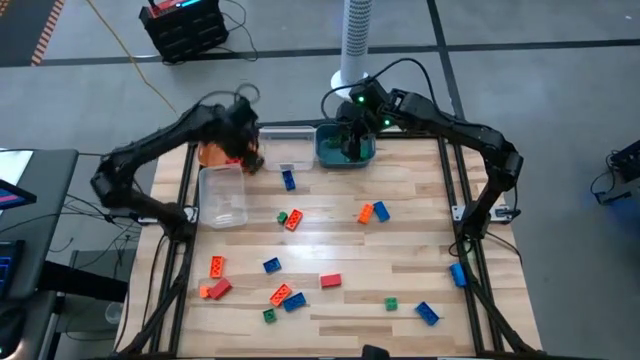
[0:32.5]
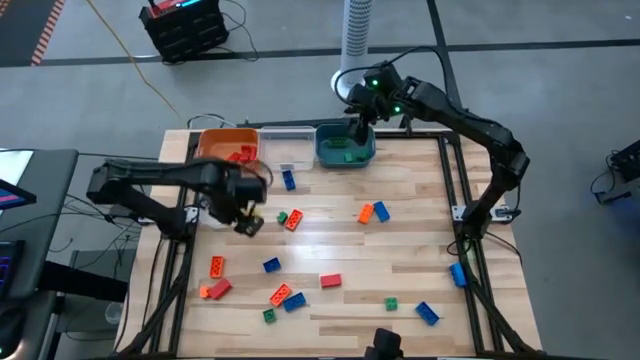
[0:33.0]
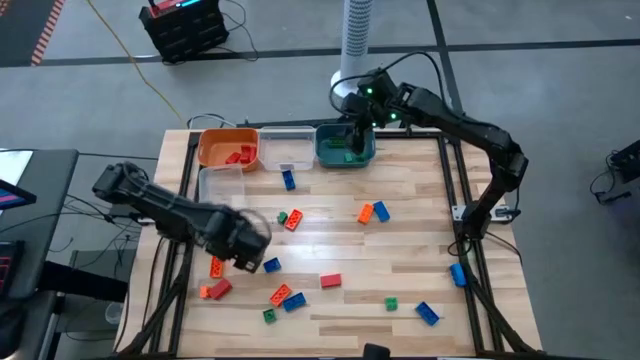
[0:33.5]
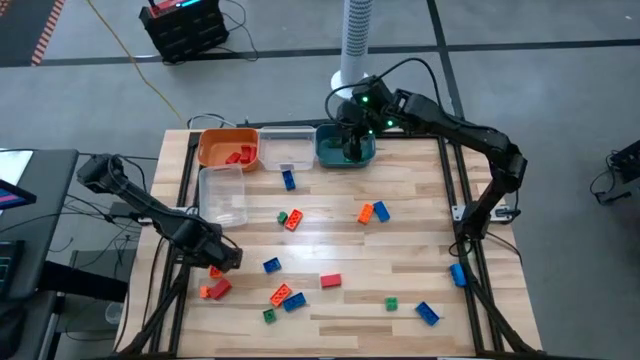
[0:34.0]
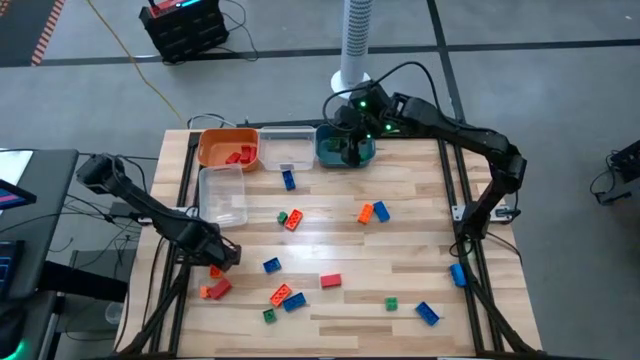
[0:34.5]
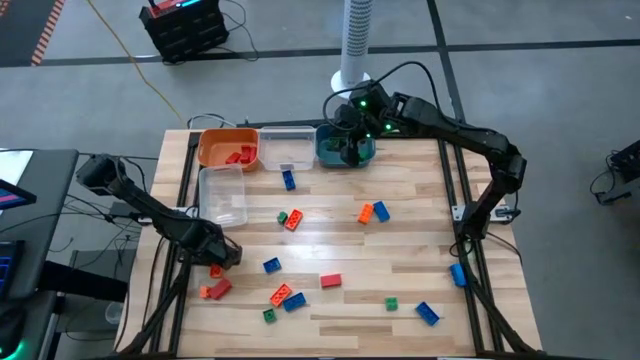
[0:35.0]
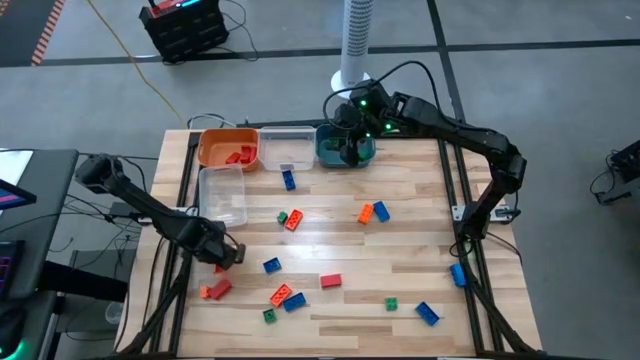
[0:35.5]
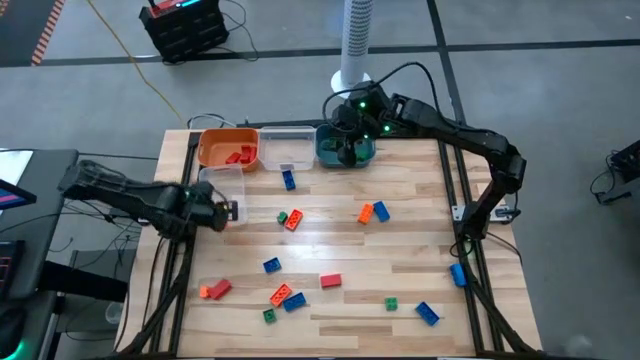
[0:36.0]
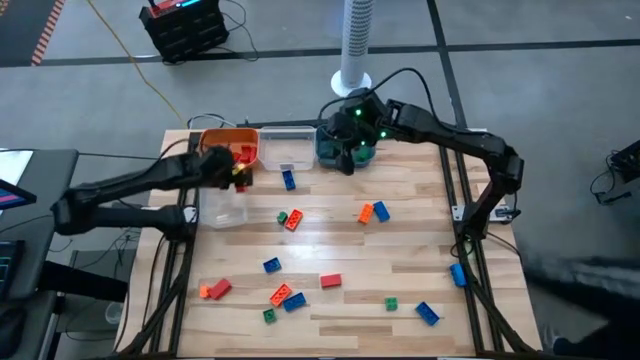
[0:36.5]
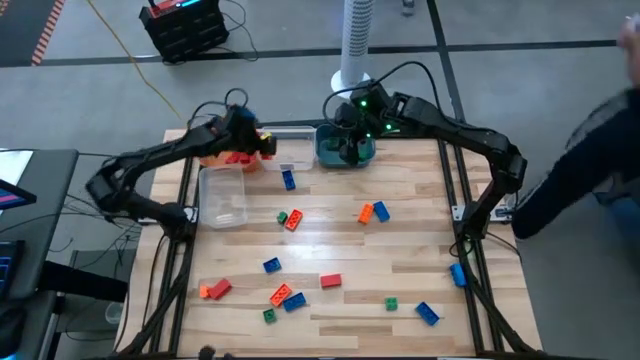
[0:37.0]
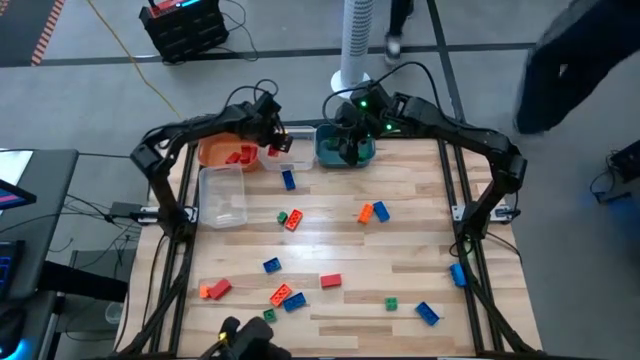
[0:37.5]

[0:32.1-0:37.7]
Task: Sort blocks
Put the orange game piece into the top transparent bin

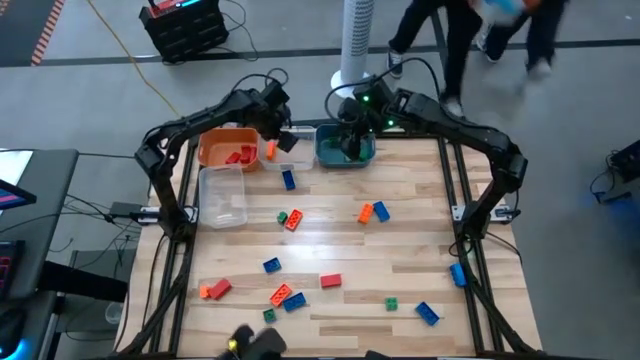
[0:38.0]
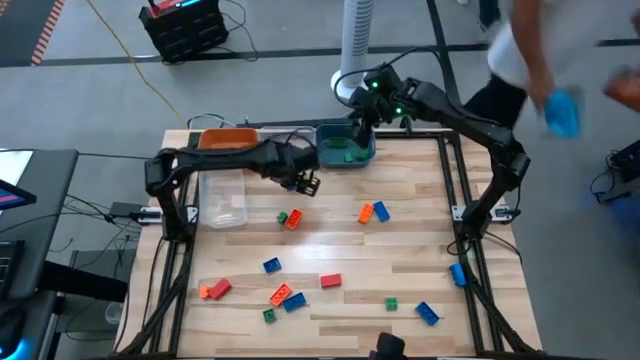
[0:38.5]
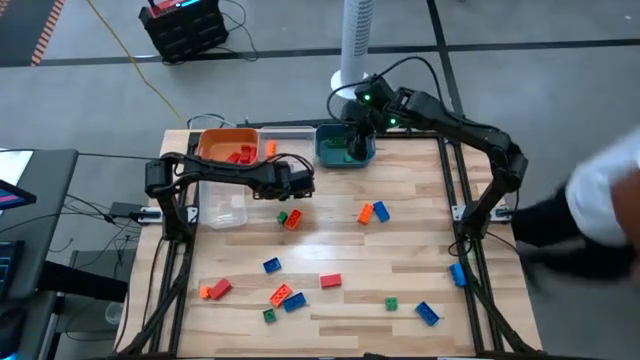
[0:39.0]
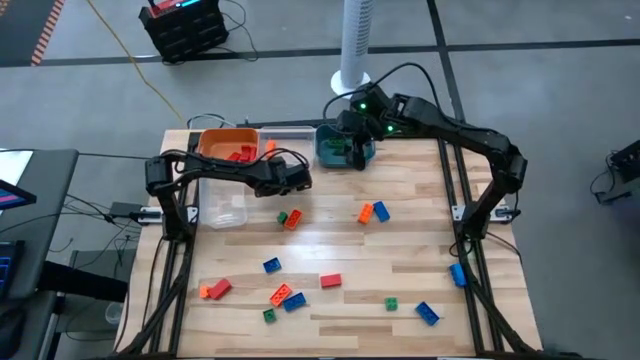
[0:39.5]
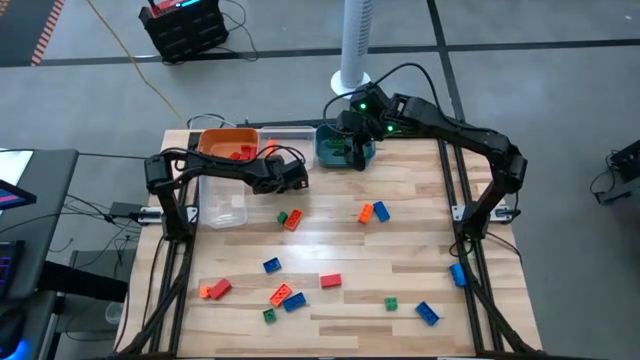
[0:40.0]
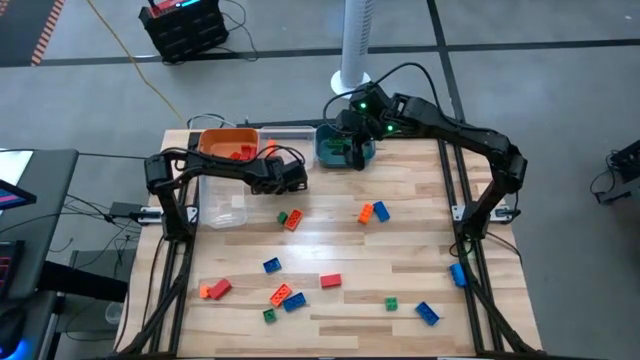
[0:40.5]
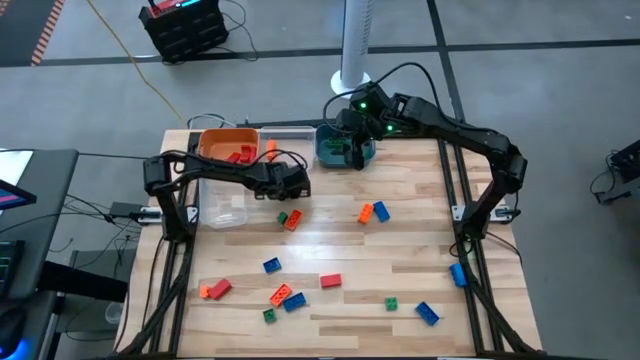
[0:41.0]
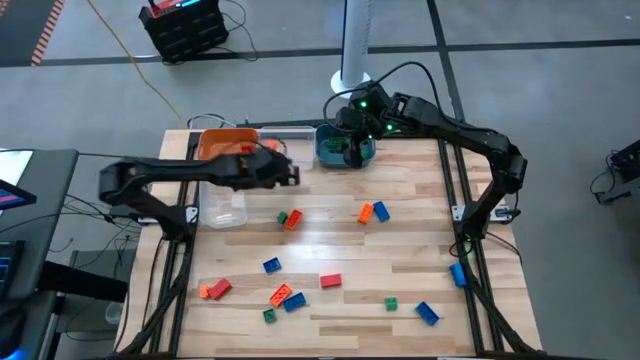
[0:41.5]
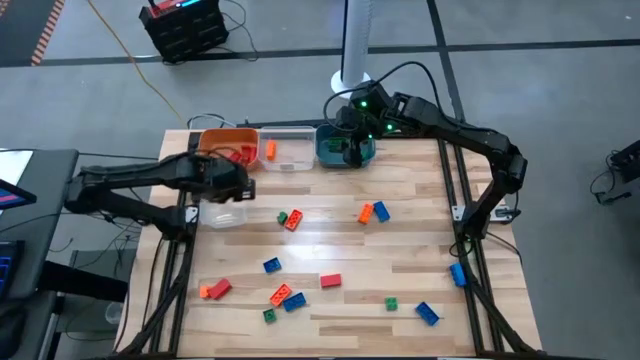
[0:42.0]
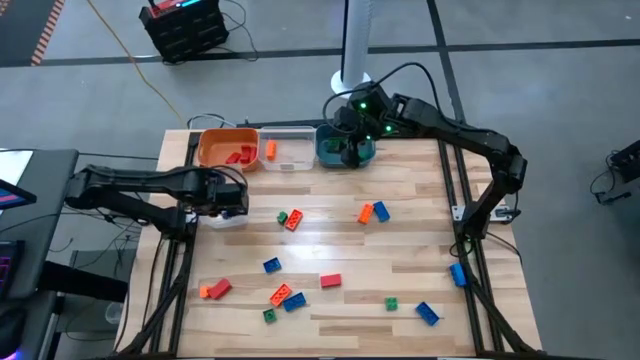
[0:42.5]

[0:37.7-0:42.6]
Put the blue game piece into the bottom transparent bin

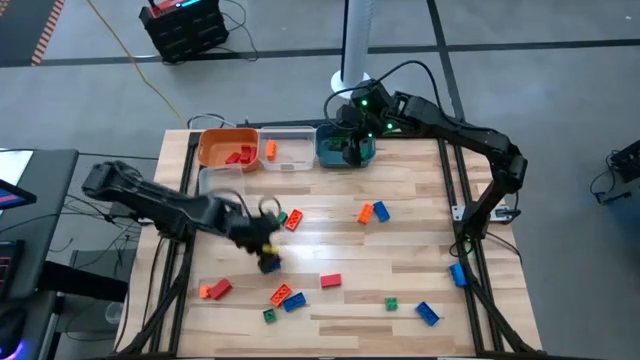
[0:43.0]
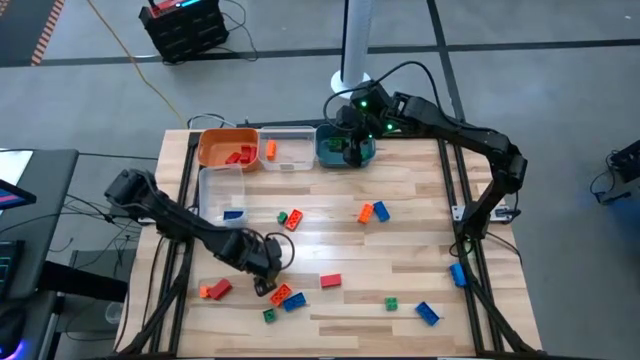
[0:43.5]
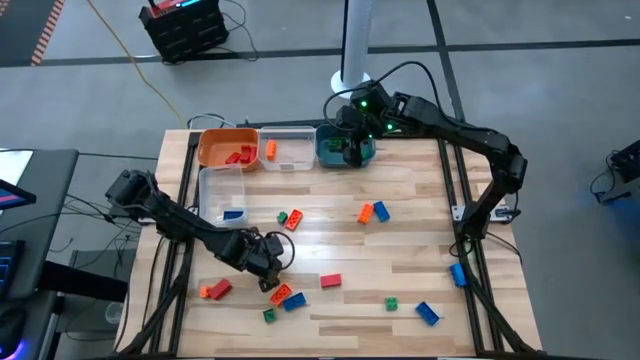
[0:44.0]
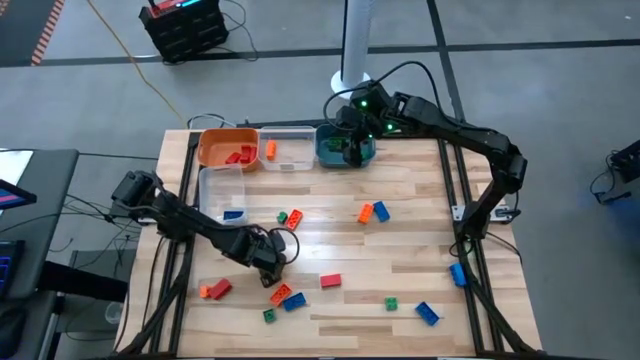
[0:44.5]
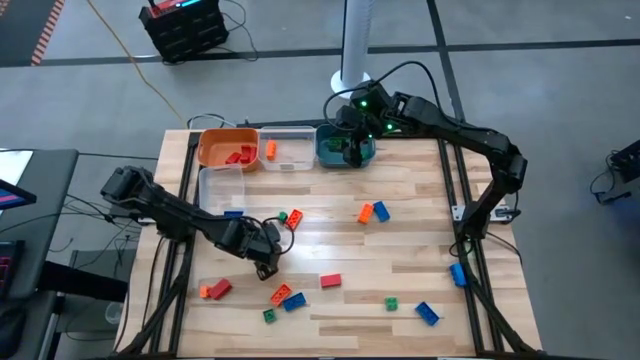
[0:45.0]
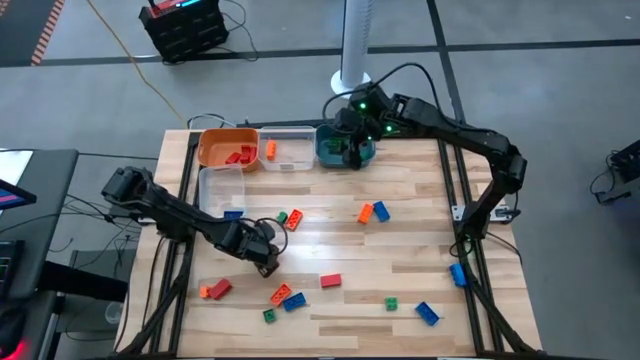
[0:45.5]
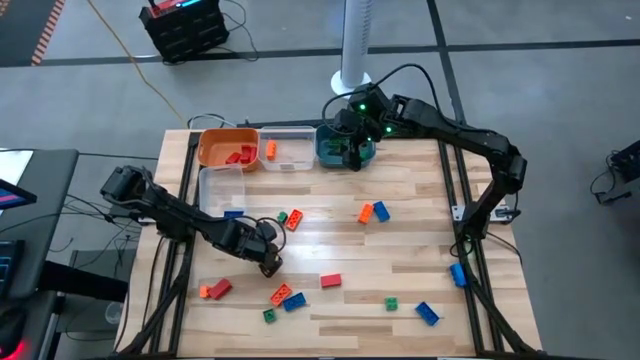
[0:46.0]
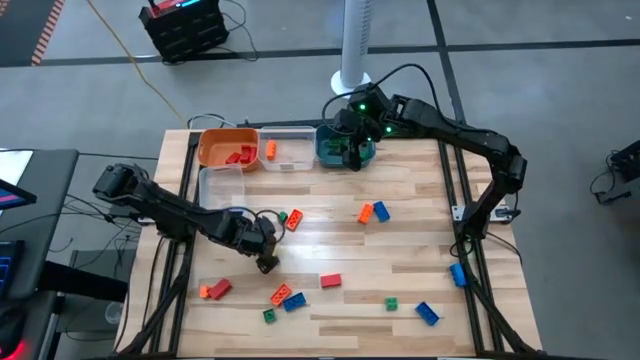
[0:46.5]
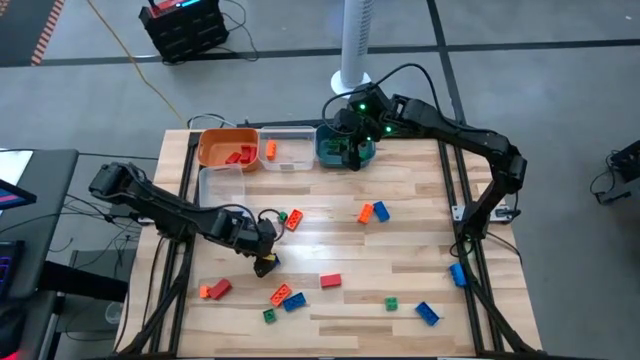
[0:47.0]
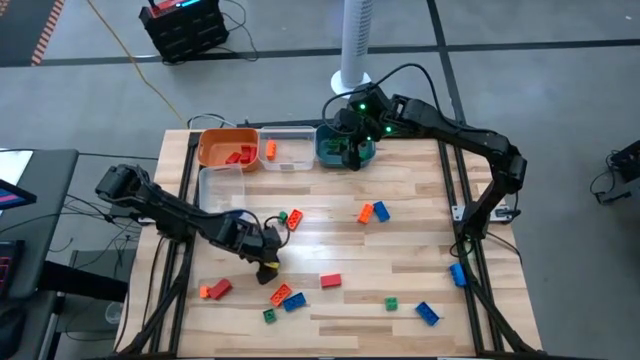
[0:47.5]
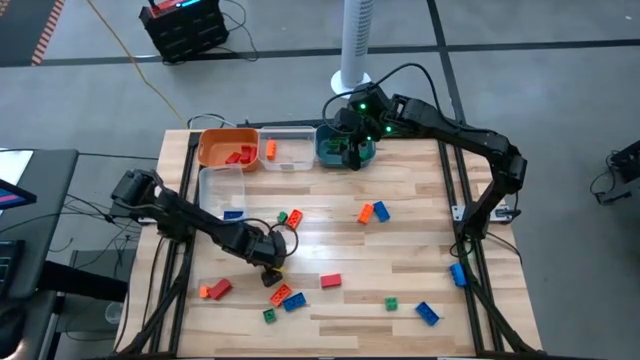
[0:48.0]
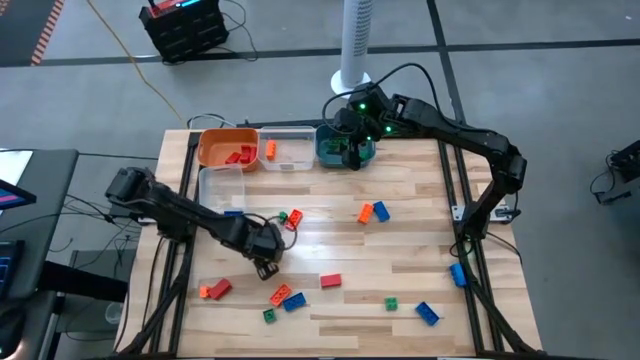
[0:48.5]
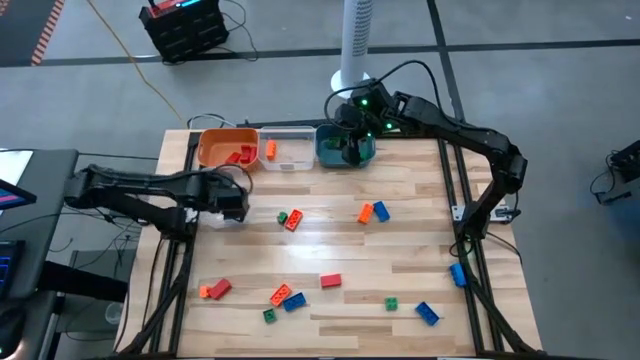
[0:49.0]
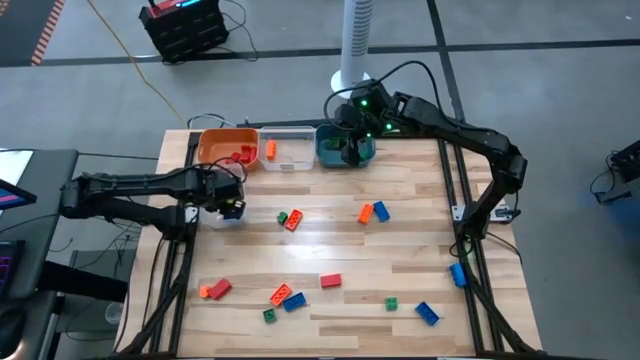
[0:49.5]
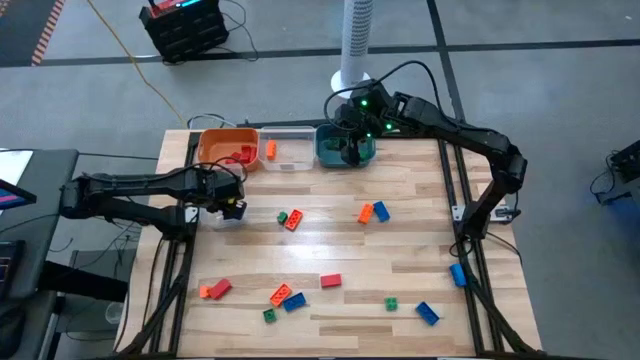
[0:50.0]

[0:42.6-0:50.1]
Put the blue game piece into the bottom transparent bin

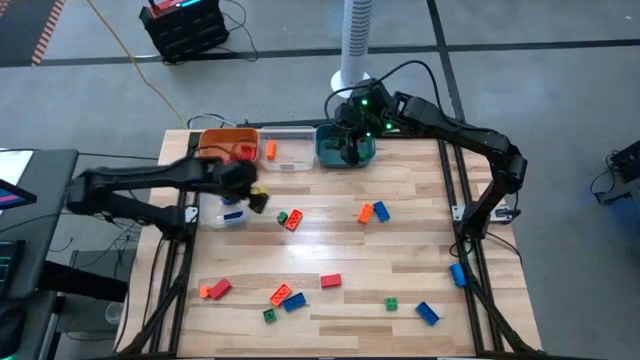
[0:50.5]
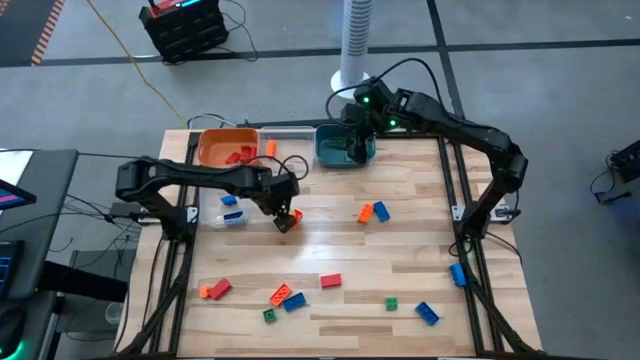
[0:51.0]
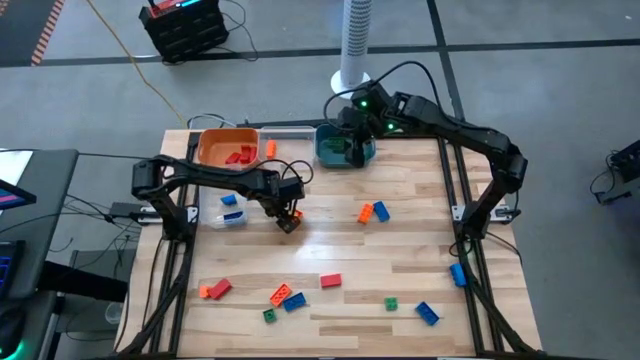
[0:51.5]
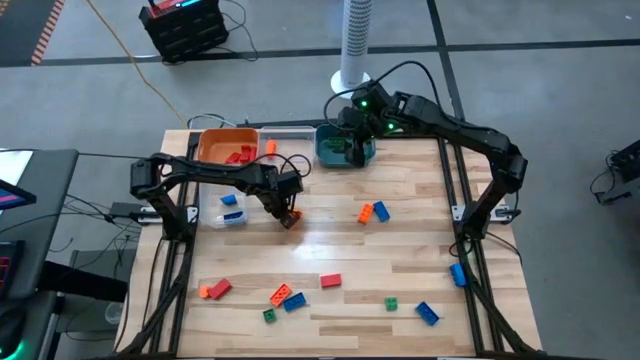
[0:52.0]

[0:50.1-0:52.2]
Put the green game piece into the blue bin
